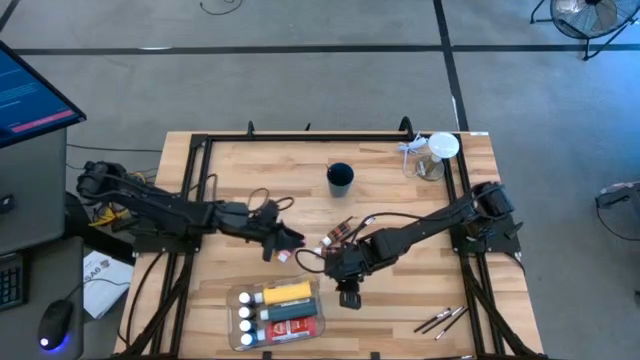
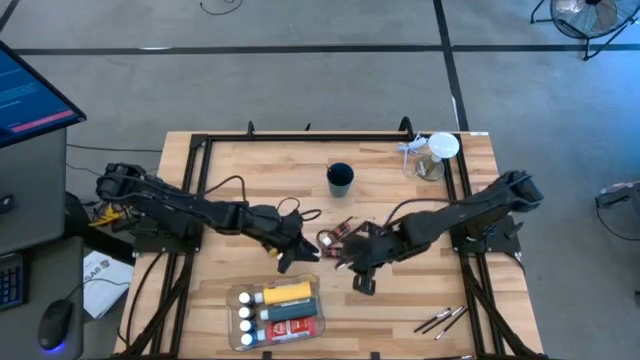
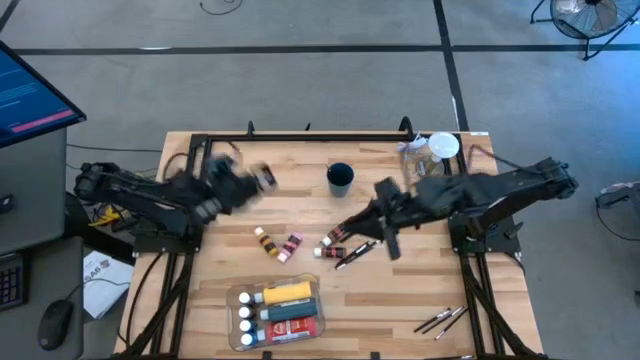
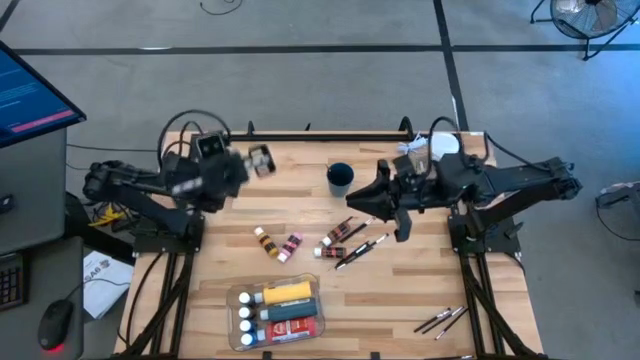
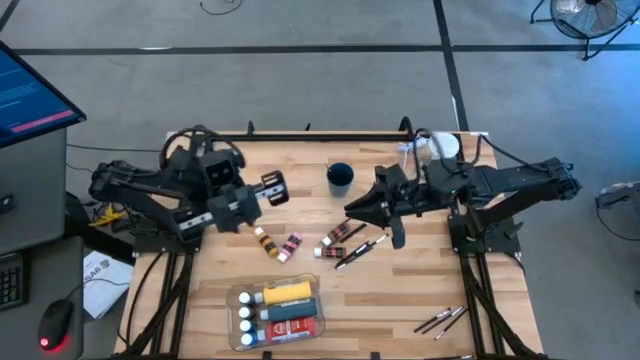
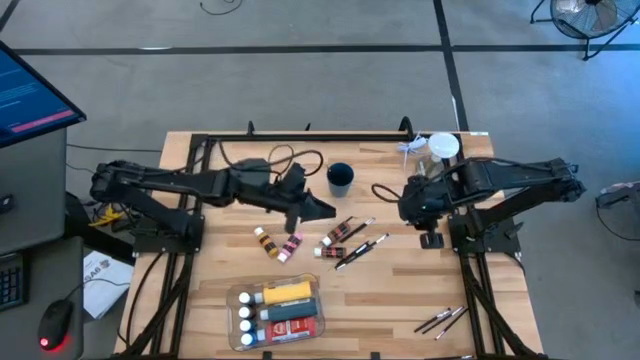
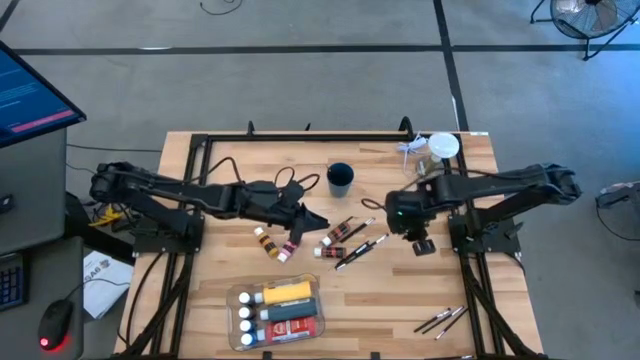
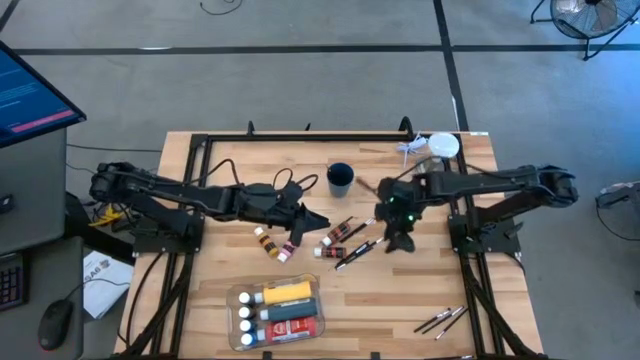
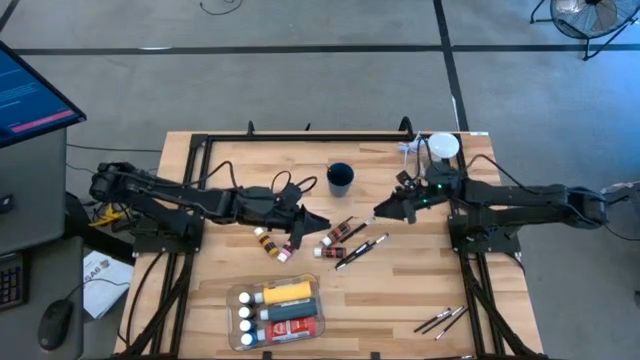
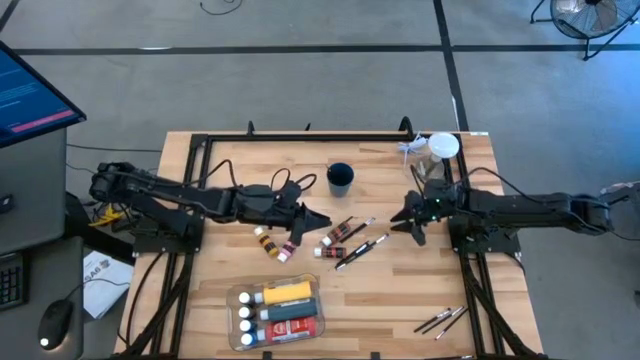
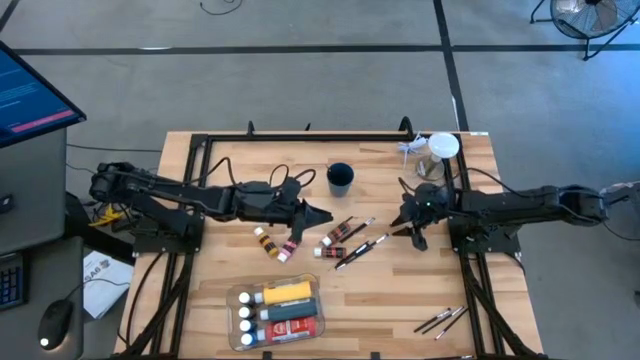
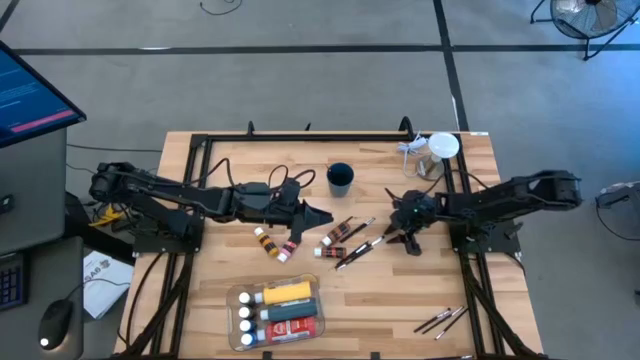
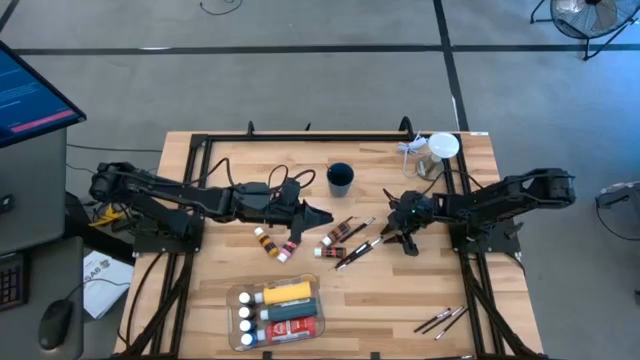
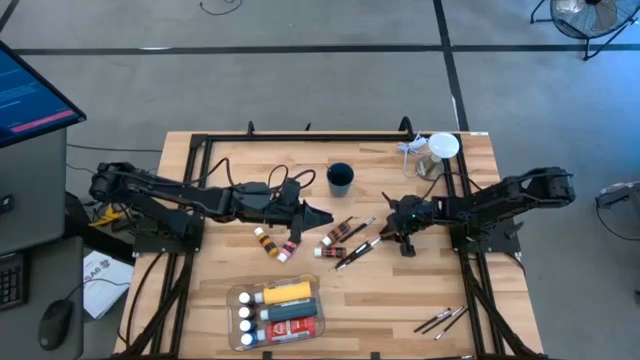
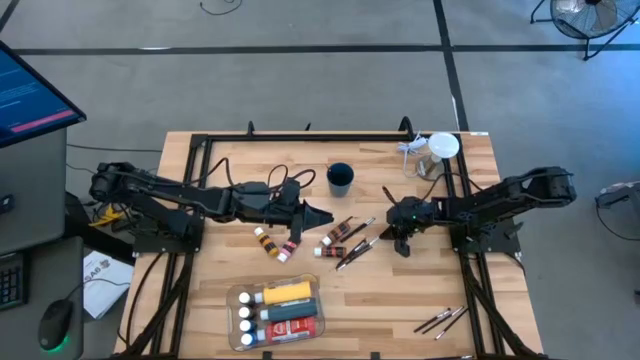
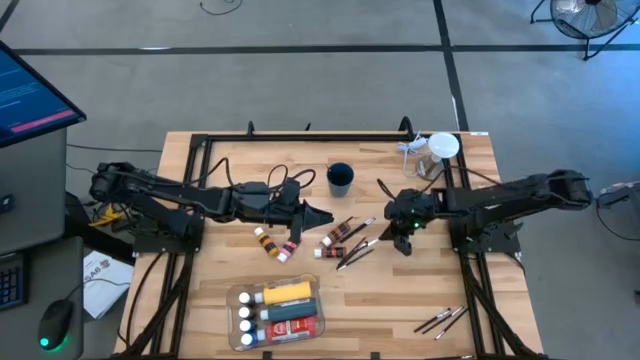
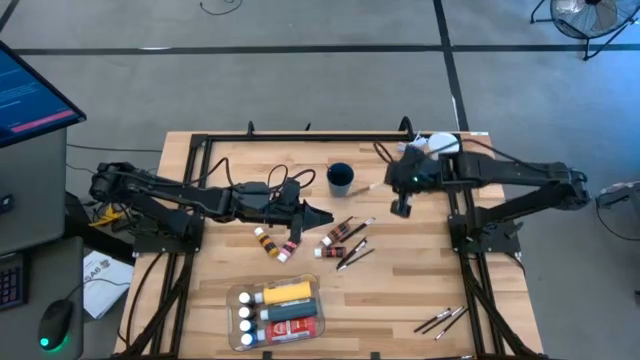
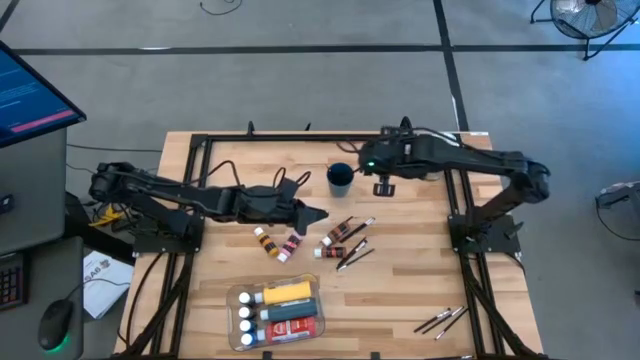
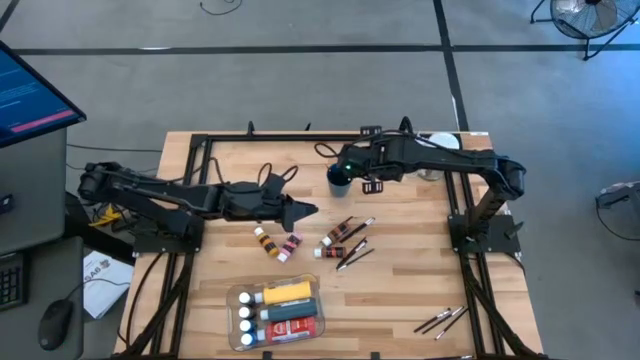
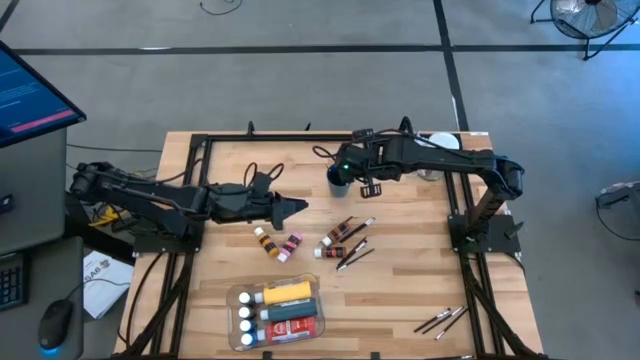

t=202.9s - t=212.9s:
Task: Pick & Place Paint Supplies
Put the paint brush into the blue cup

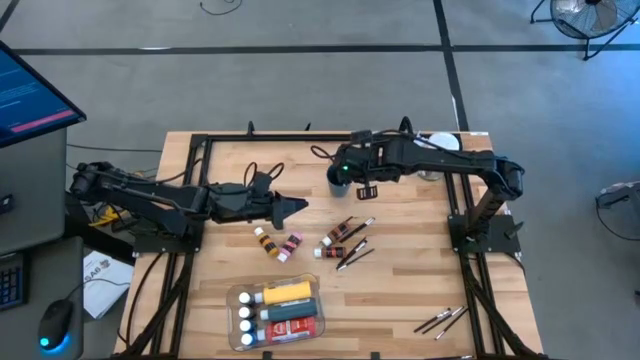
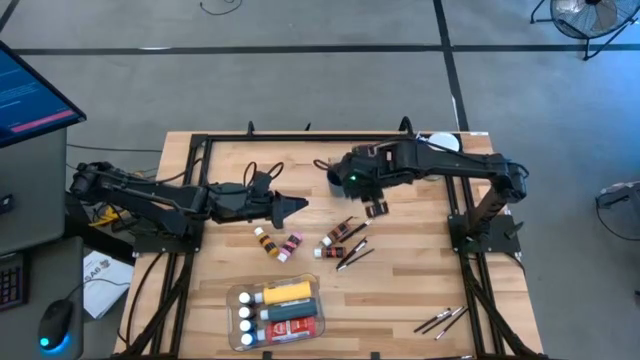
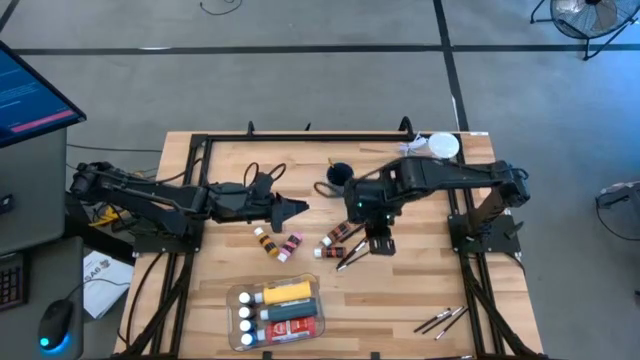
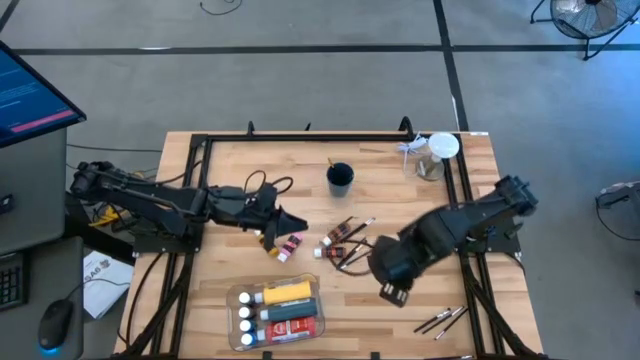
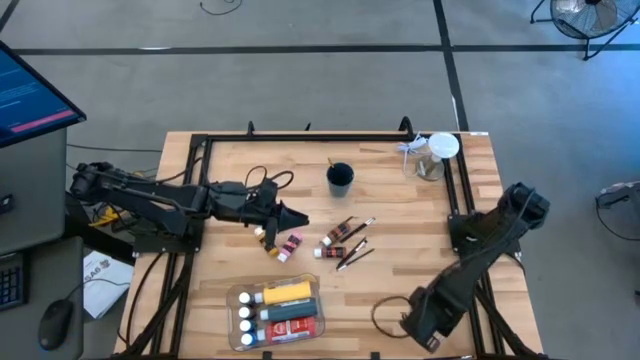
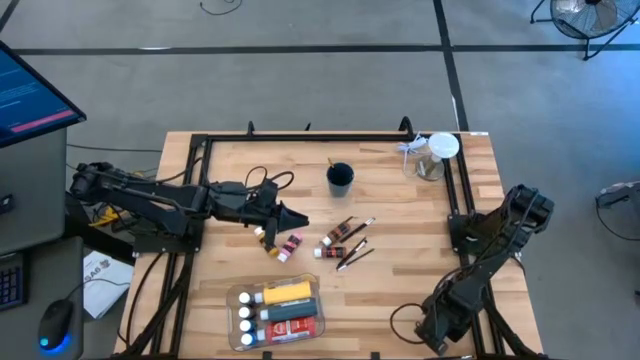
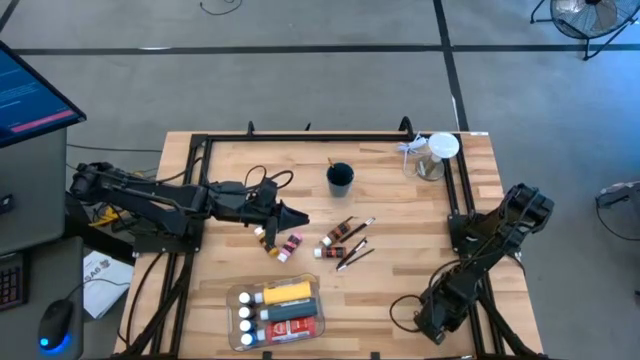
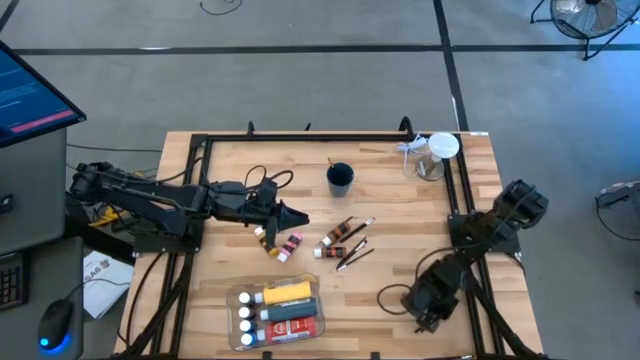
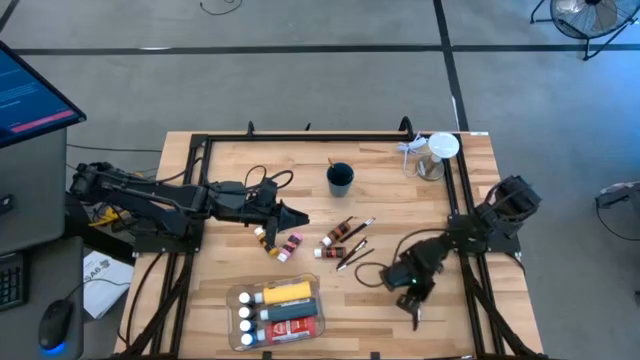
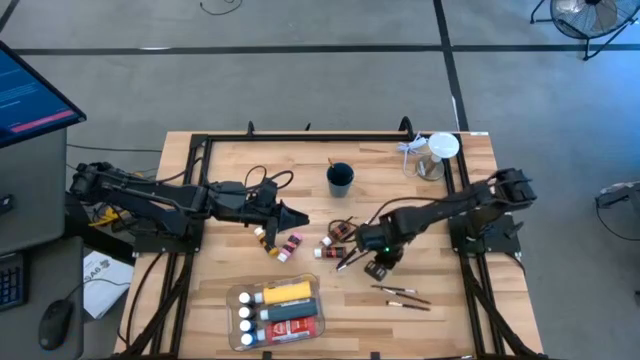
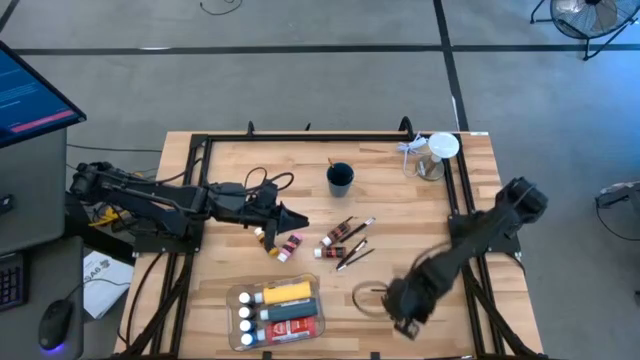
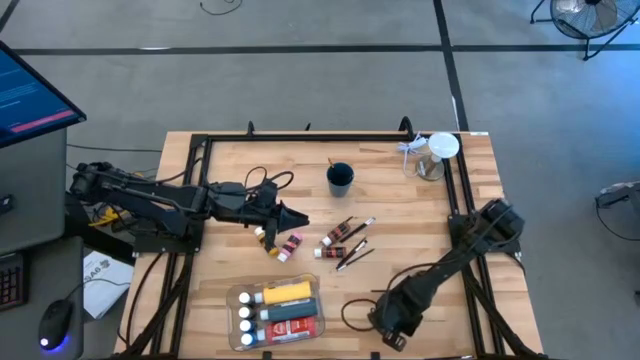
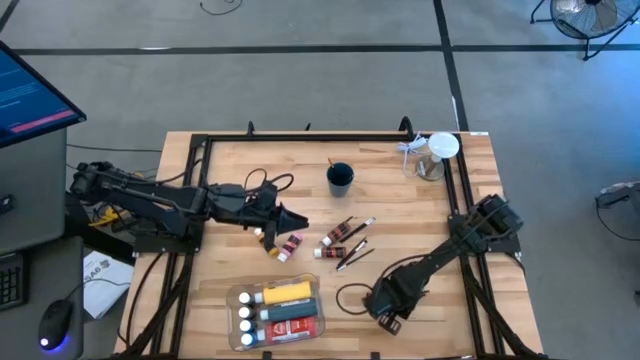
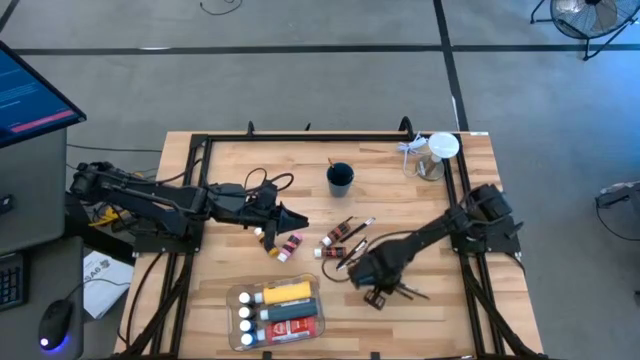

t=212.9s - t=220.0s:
Adjust the paint brushes on the table

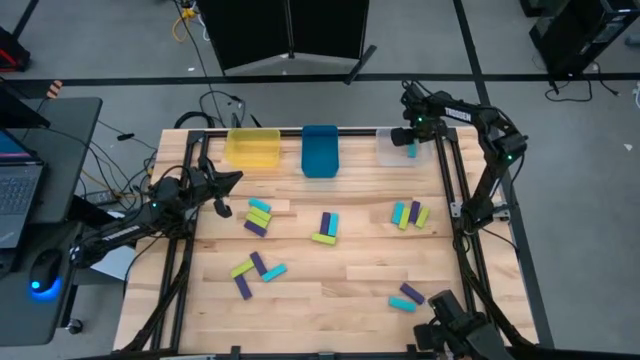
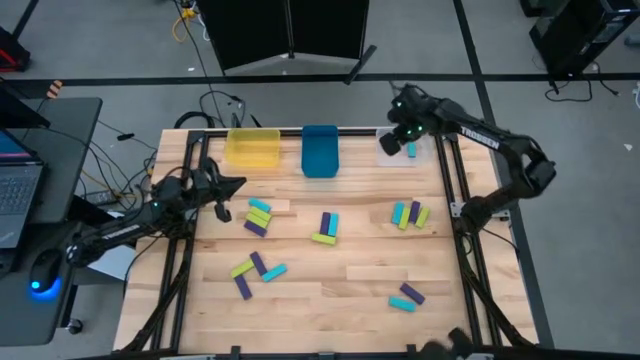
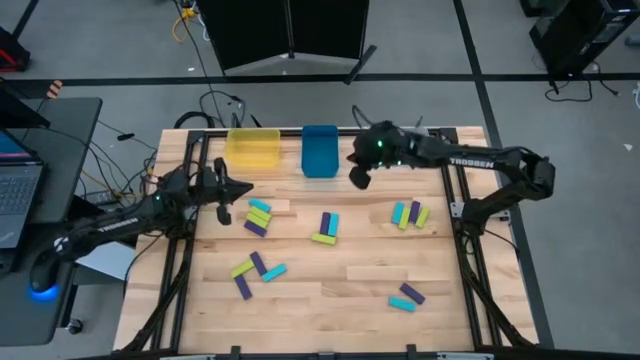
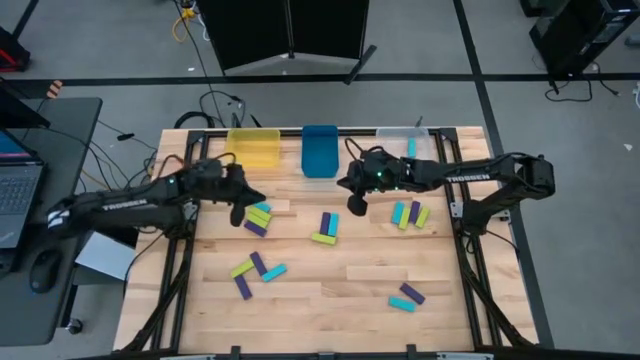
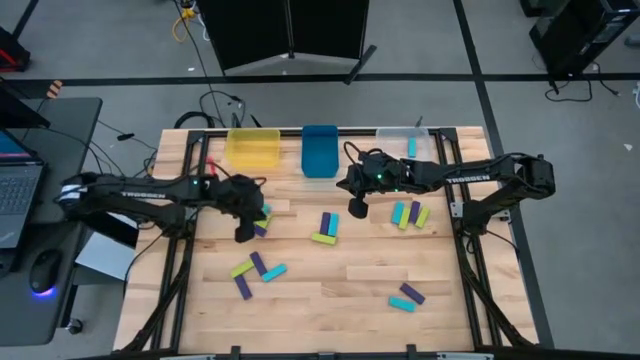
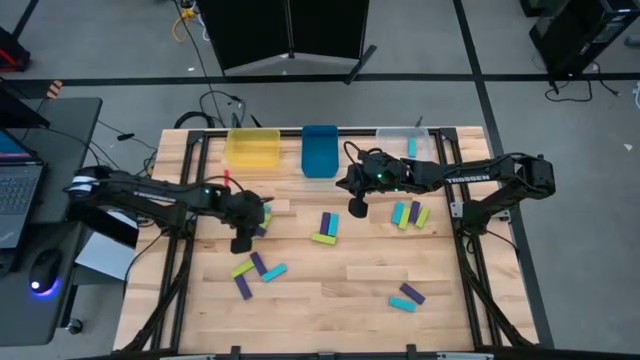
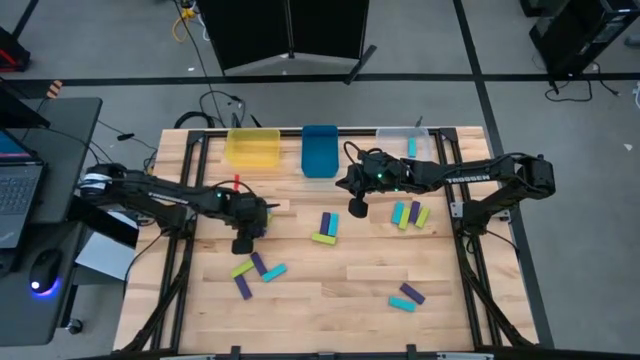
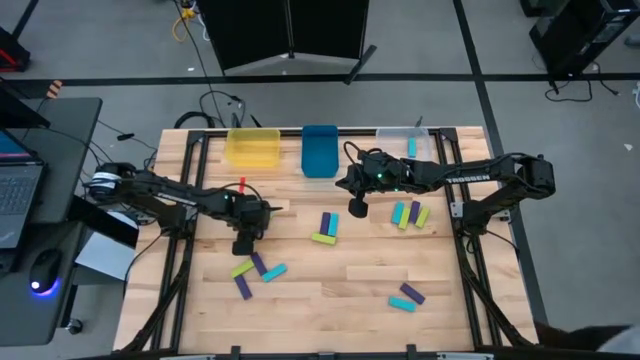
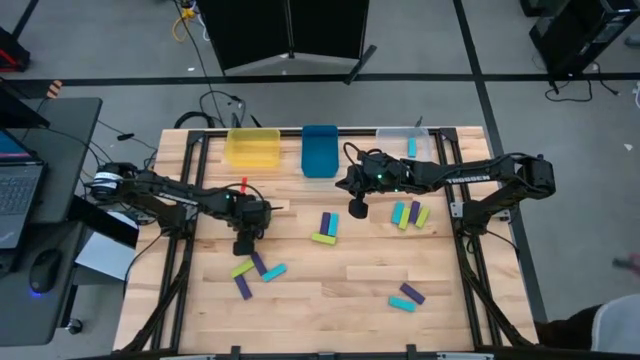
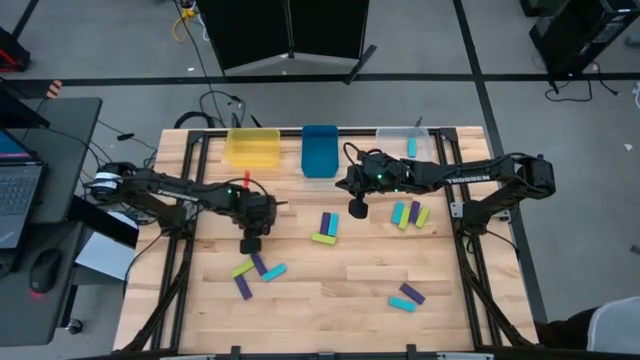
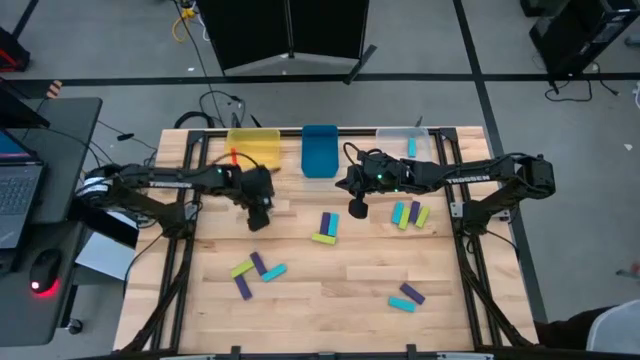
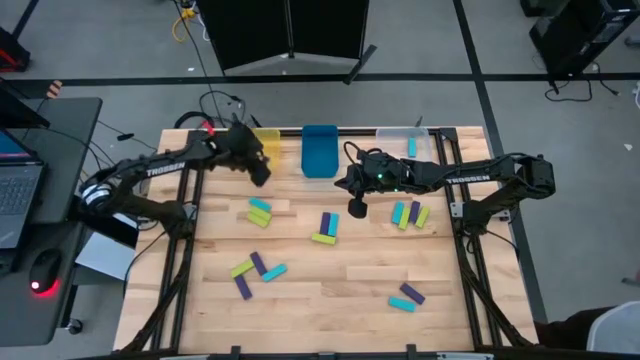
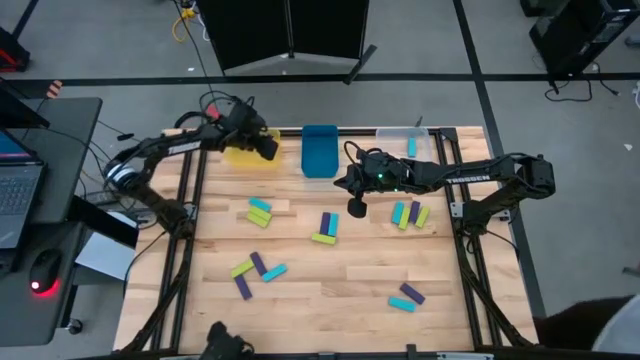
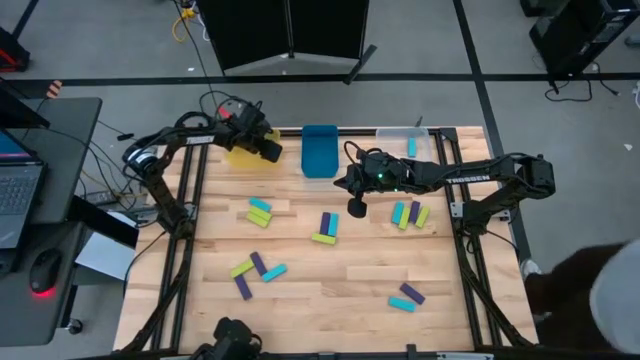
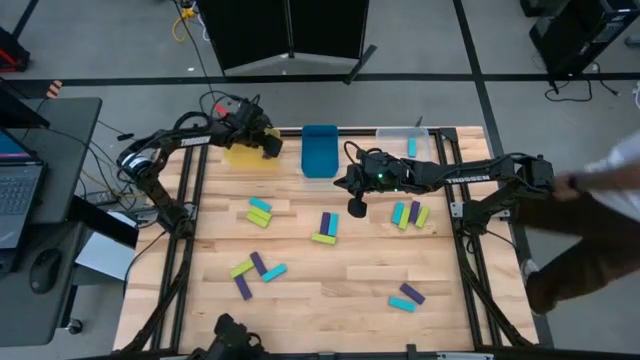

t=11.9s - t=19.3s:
Task: Sort blocks
Put the violet block into the yellow bin
